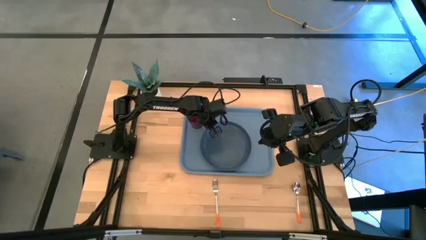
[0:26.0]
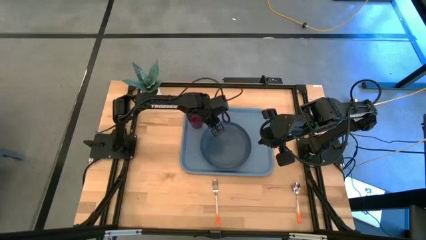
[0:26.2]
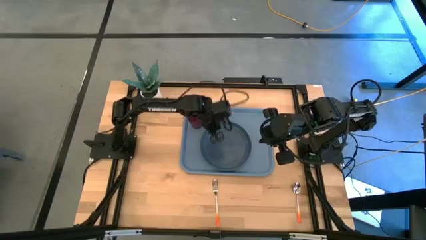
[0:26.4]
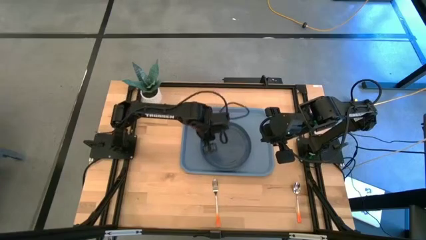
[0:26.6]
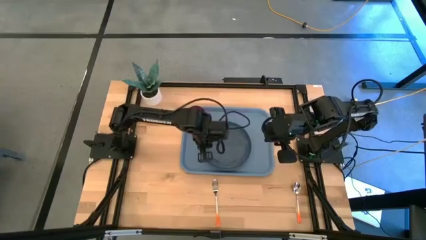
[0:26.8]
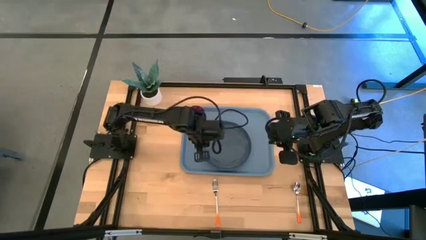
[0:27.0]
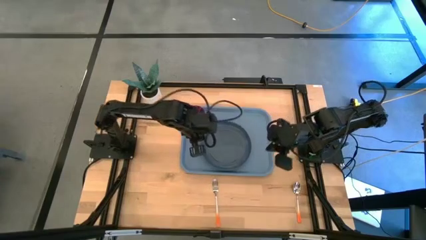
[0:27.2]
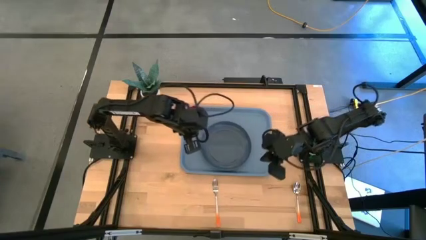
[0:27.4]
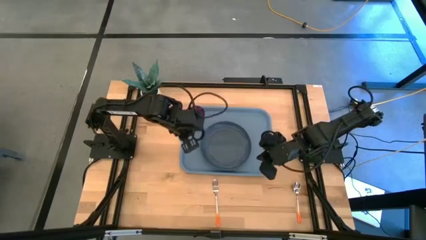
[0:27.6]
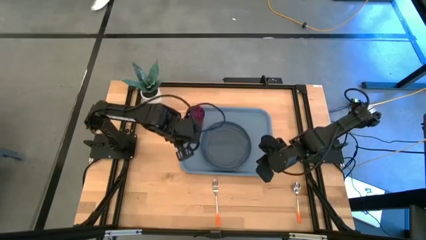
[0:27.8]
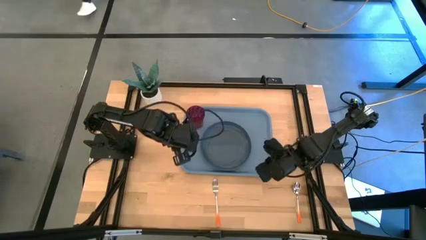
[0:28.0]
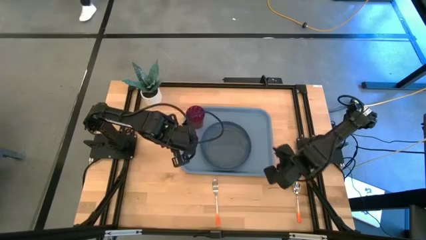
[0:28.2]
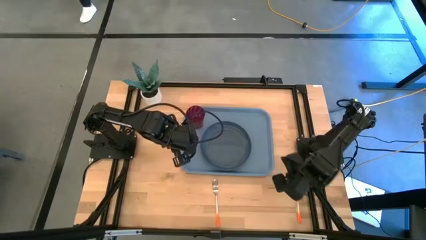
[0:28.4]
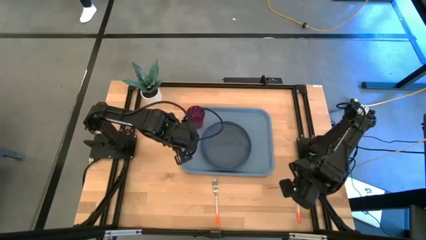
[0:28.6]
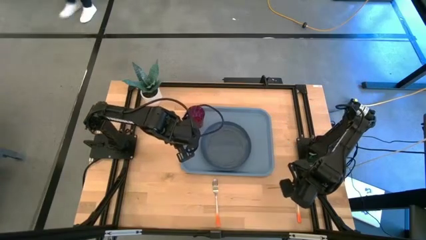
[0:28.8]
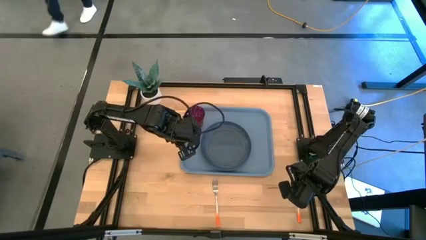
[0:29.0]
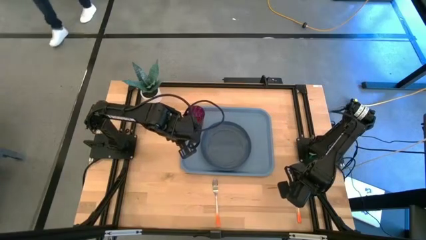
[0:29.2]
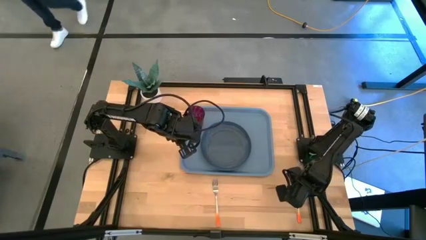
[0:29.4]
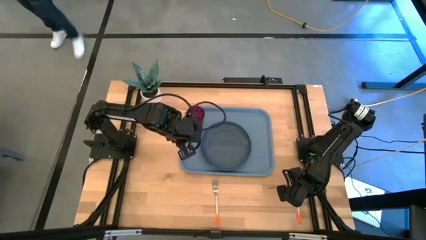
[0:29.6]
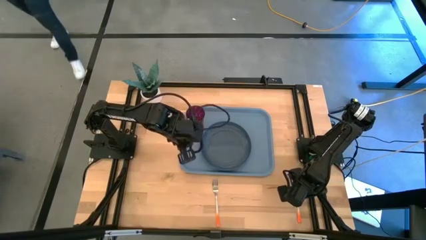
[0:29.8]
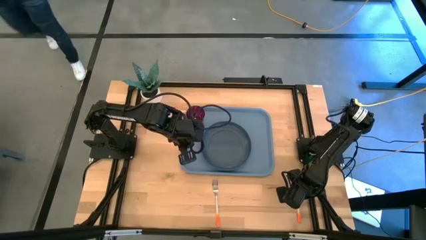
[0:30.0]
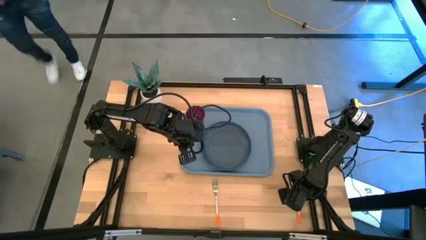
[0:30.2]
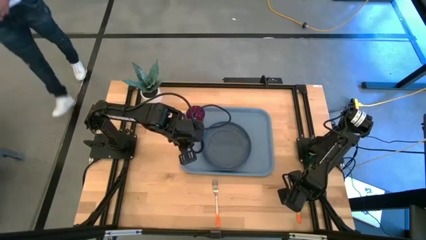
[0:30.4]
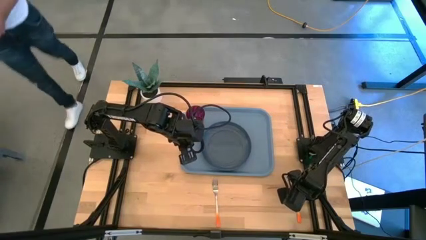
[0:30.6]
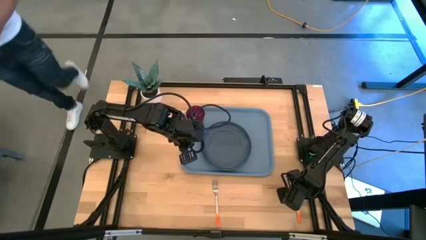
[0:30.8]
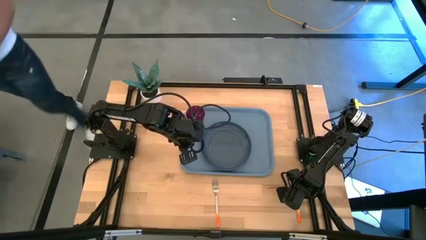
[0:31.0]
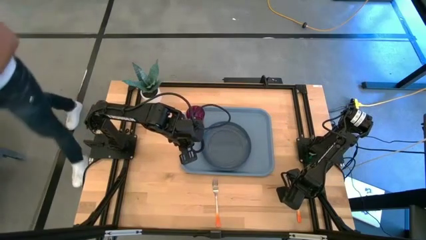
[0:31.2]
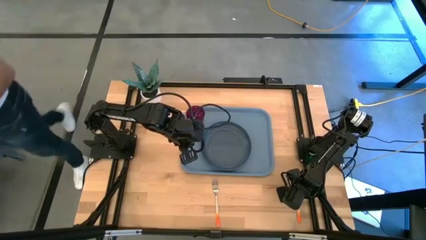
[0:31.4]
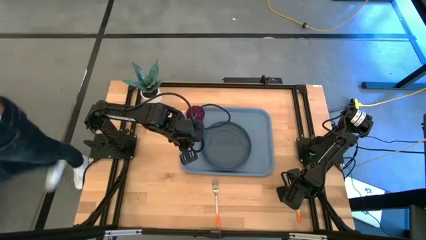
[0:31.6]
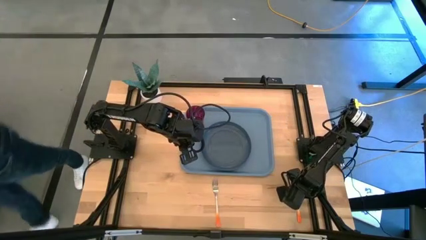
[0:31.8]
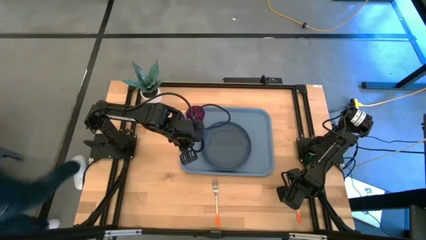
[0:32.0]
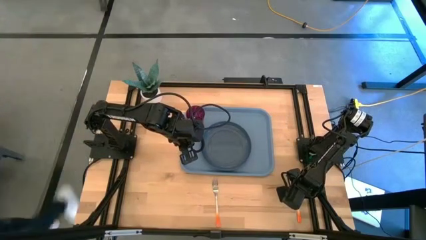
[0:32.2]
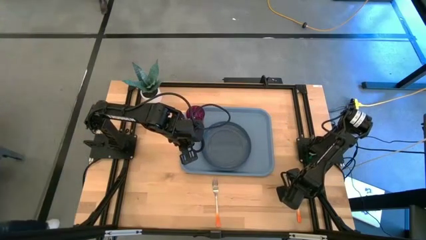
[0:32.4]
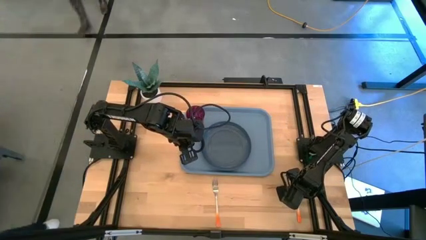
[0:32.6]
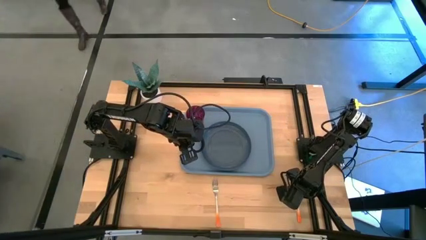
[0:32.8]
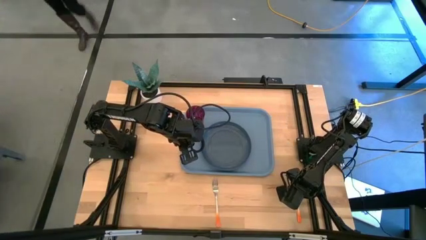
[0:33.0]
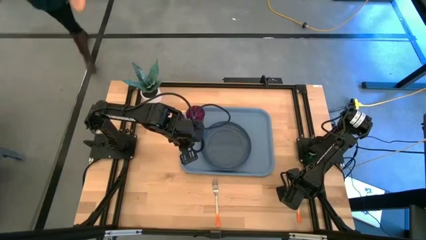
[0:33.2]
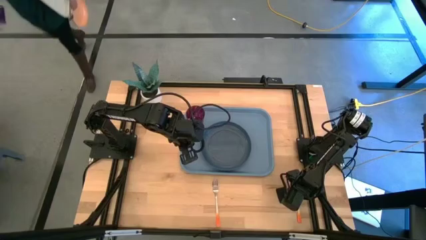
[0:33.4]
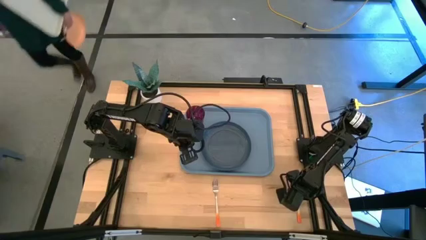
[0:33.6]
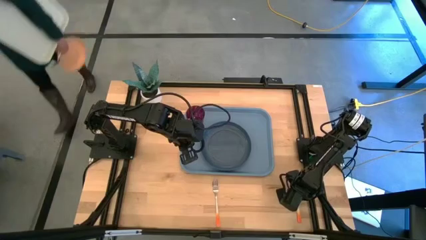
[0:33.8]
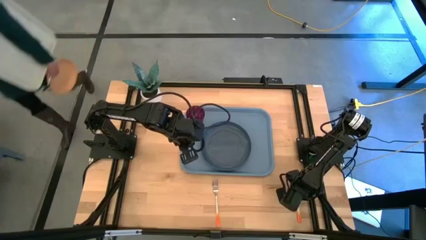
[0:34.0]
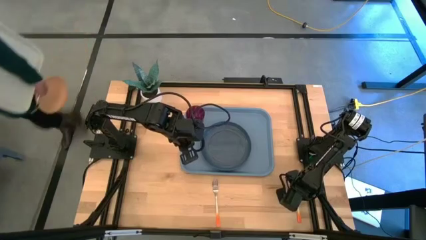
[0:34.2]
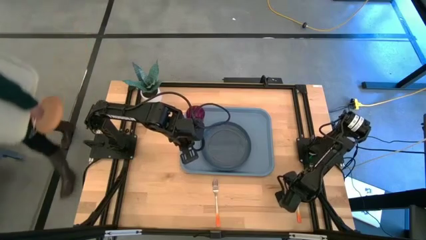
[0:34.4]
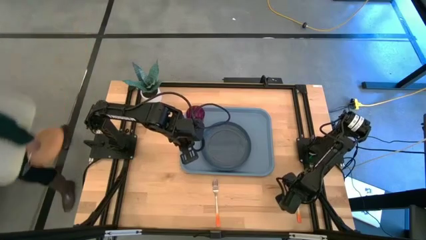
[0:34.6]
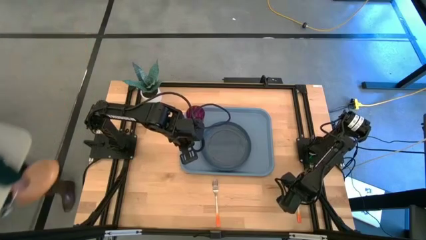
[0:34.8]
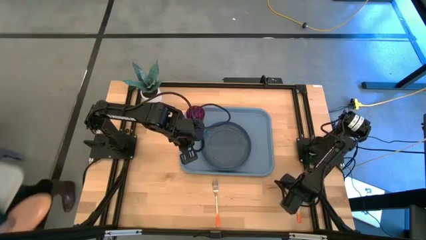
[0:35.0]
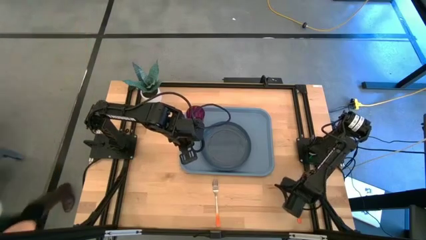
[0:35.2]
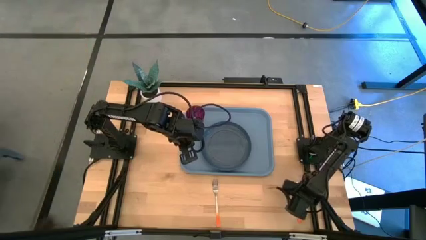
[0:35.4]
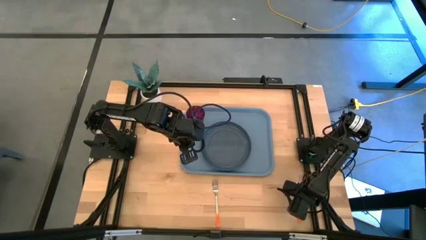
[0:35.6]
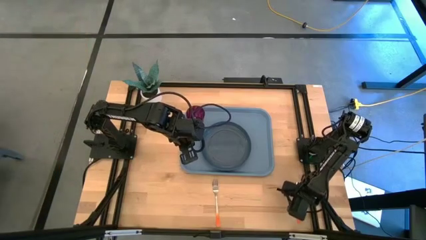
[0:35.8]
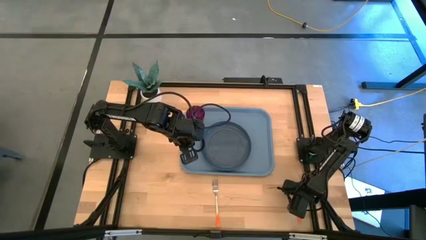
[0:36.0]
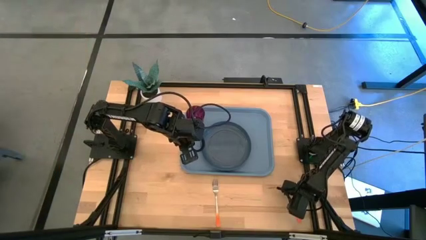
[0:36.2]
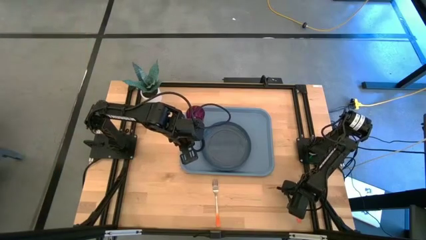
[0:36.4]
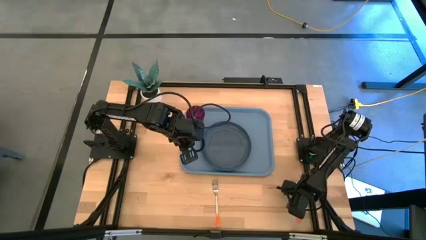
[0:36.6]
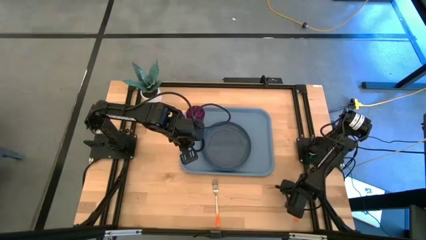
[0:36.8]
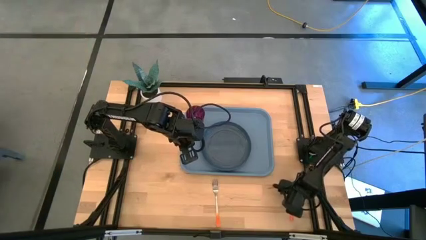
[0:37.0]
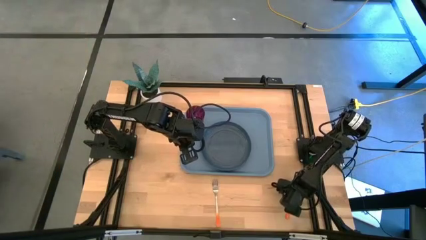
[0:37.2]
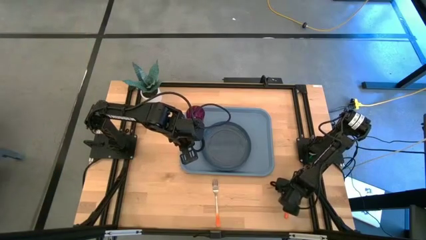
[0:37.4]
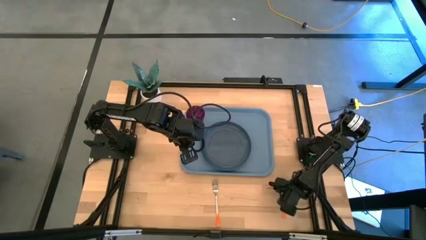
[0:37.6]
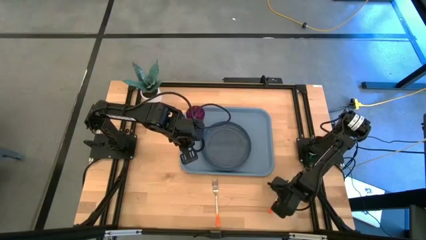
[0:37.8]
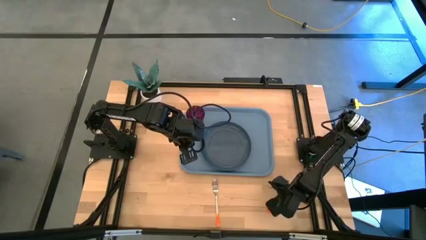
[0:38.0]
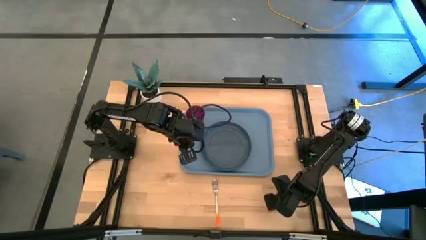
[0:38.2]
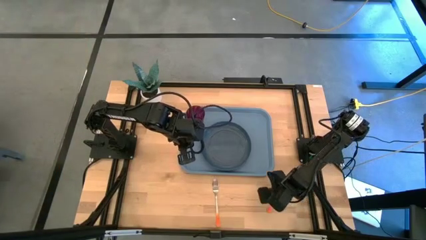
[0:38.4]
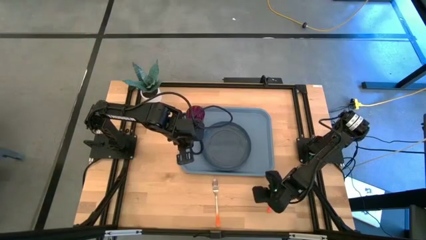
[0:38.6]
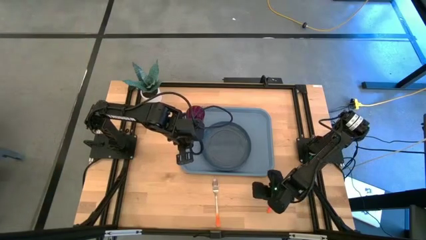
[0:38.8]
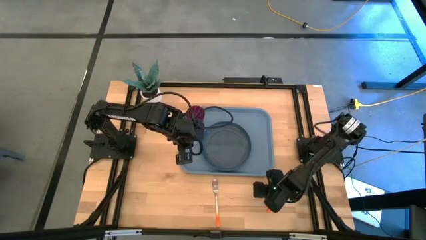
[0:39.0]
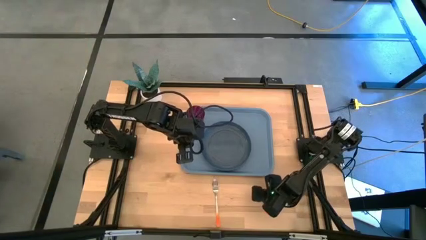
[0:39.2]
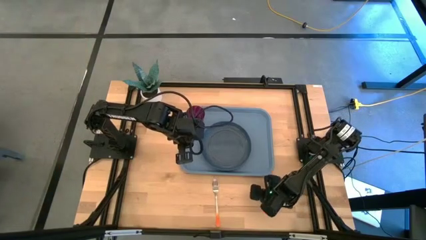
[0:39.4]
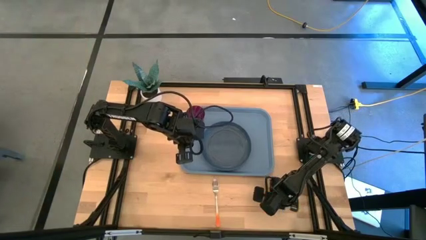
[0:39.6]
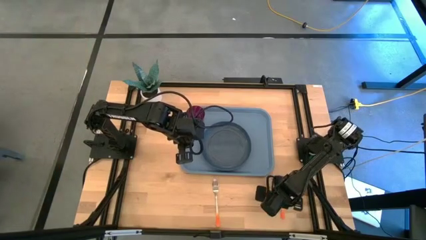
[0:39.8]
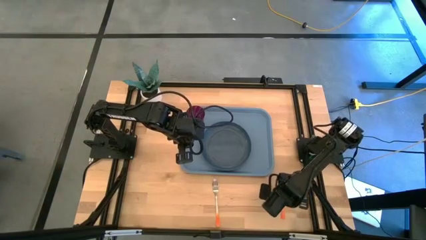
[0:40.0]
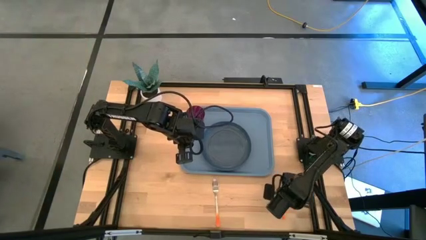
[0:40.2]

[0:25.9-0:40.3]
Task: Pick and place plate/cup/fork/spoon on tray
Put the orange spoon on the light blue tray to the right of the blue plate

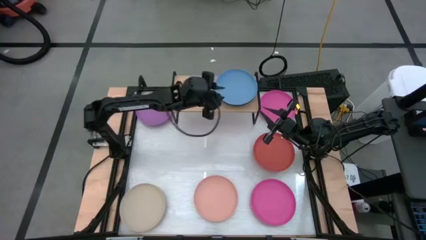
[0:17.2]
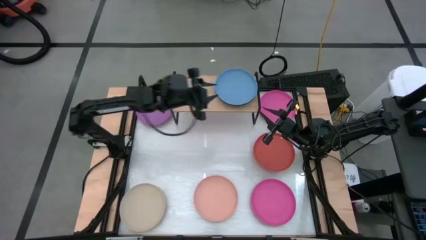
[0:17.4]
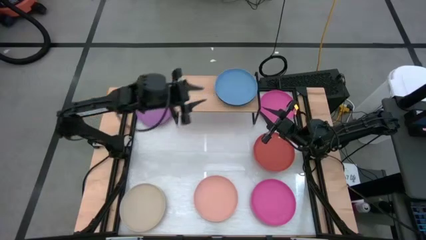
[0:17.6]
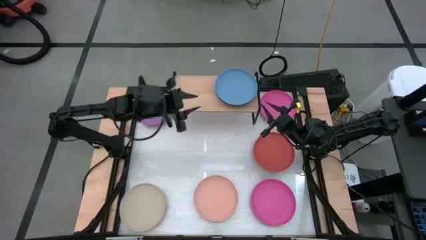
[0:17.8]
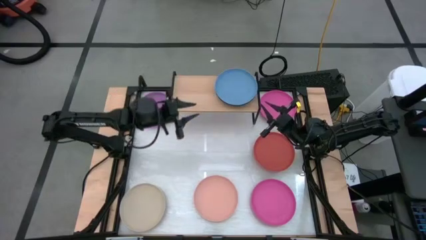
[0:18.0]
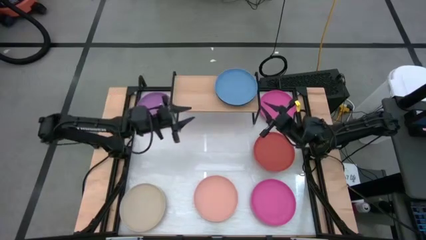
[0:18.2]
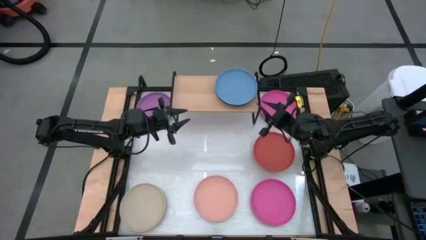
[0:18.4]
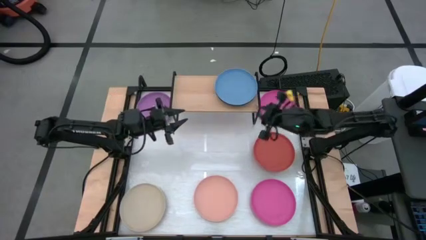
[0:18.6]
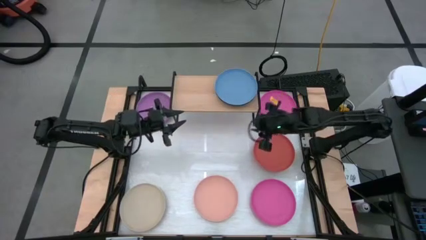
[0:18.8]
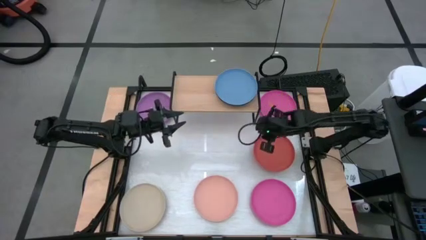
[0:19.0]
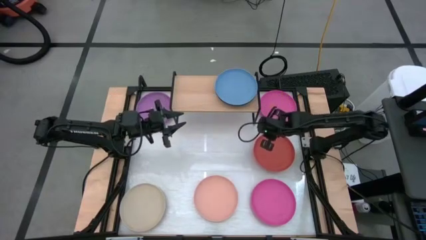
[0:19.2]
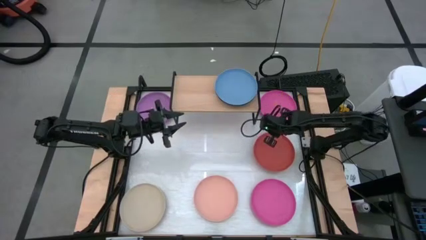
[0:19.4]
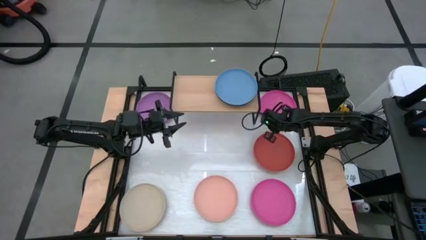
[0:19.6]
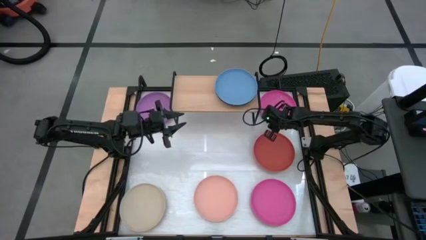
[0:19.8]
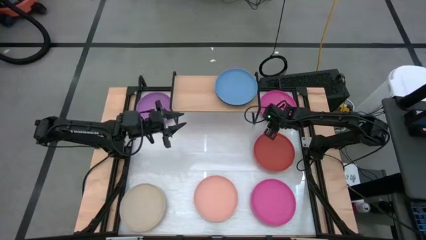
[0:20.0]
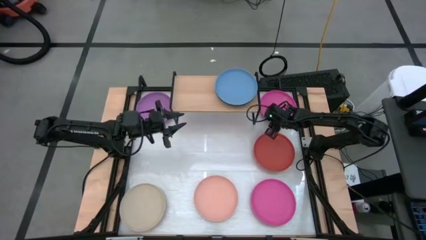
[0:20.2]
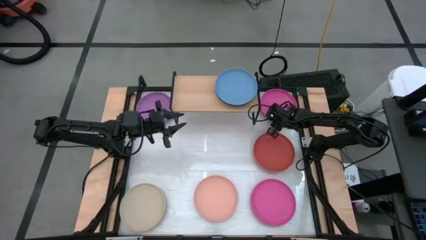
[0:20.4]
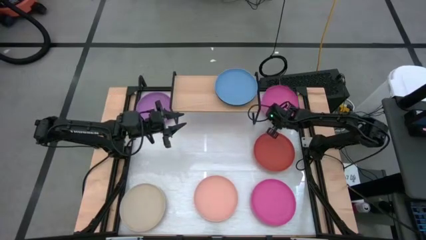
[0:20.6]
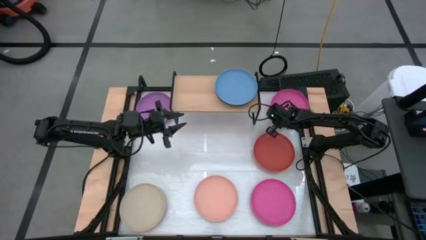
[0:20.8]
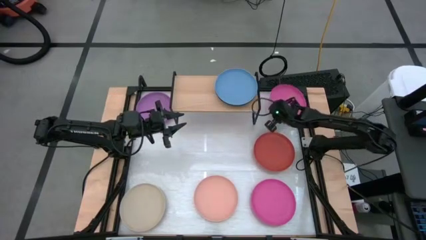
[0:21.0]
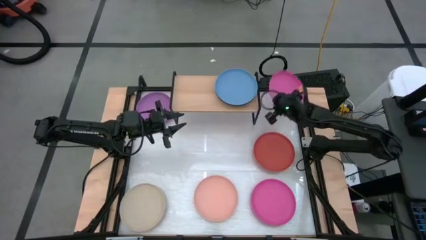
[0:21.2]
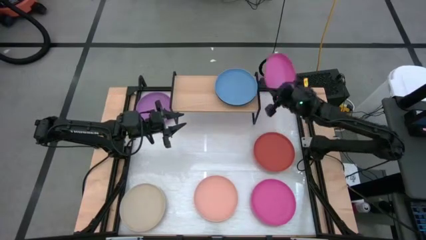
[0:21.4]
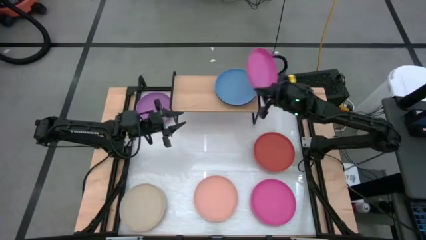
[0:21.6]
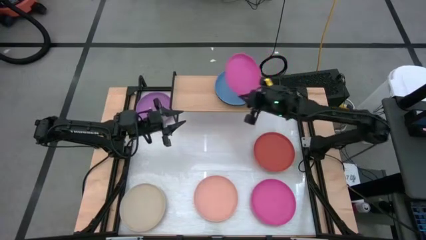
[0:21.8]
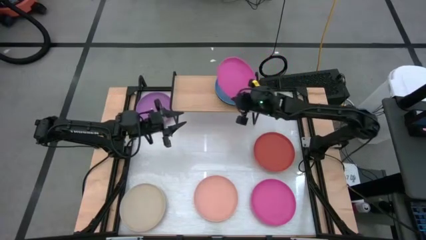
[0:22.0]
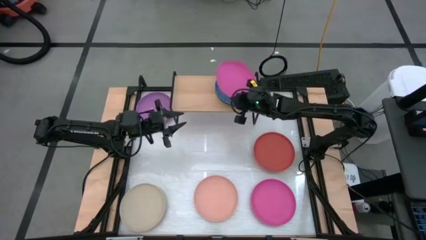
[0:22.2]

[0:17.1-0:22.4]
Task: Place and stack plates onto a shelf
Stack the pink plate on top of the blue plate on the shelf
